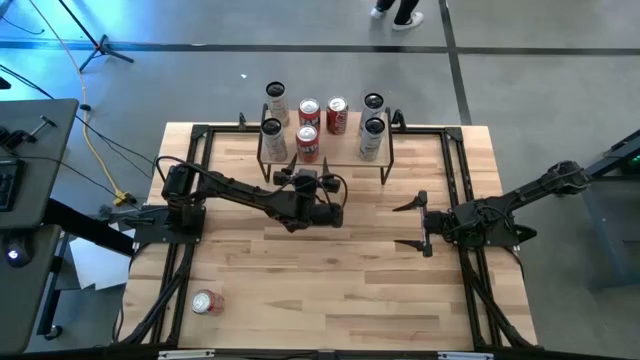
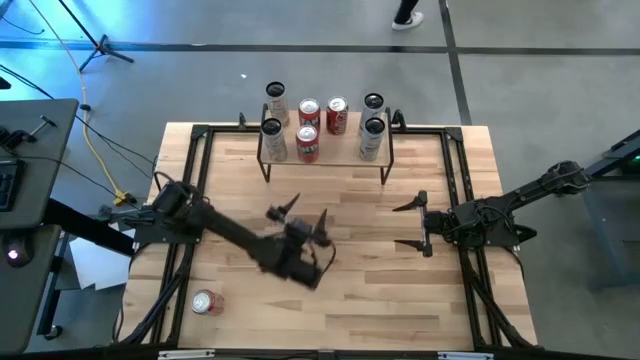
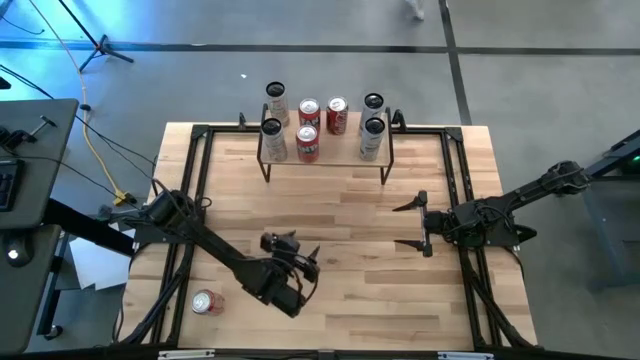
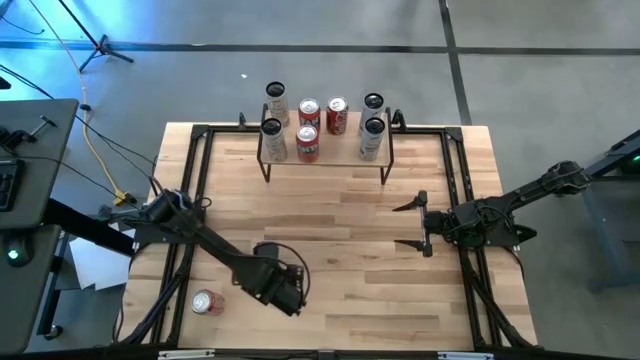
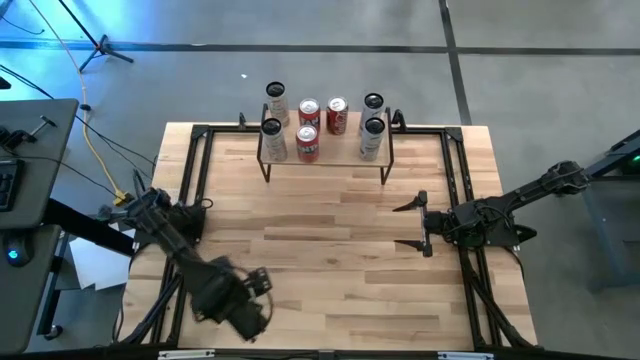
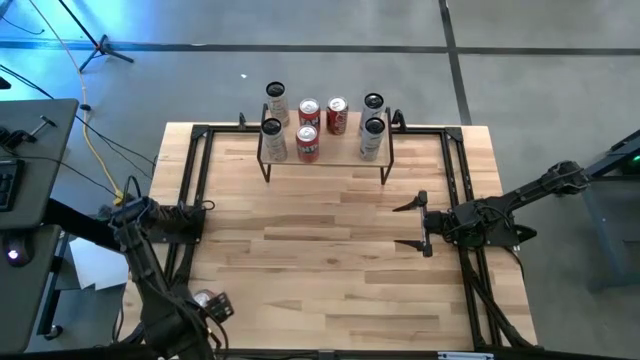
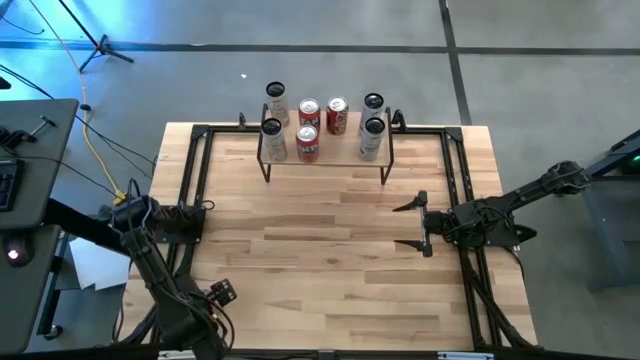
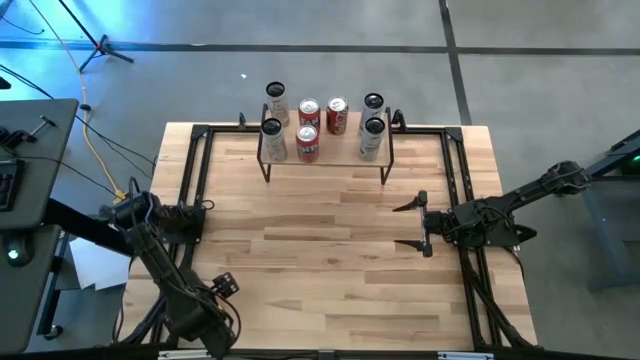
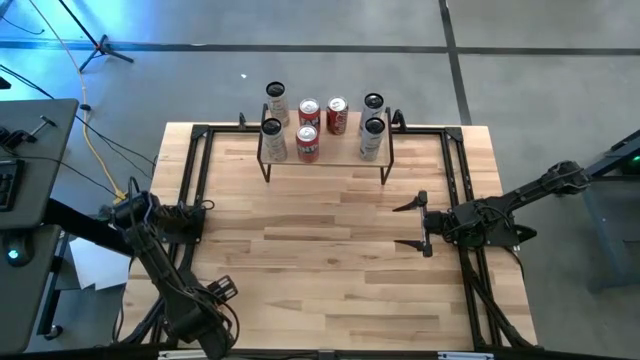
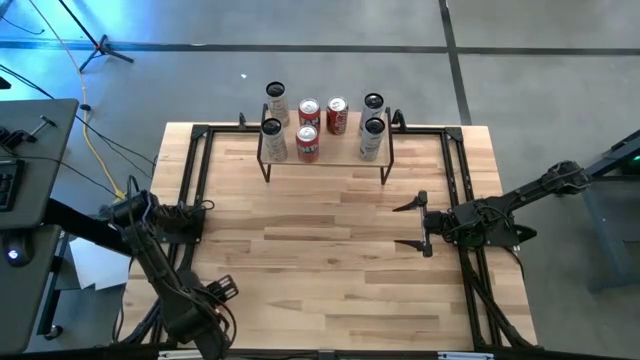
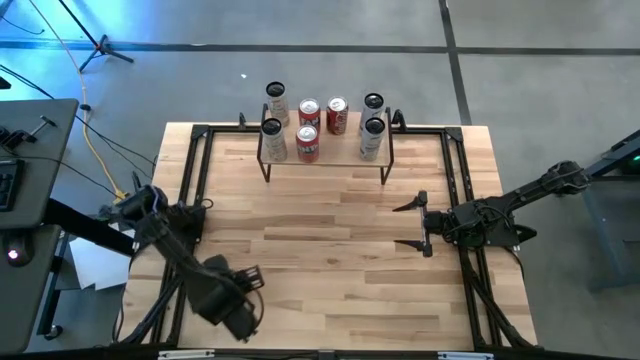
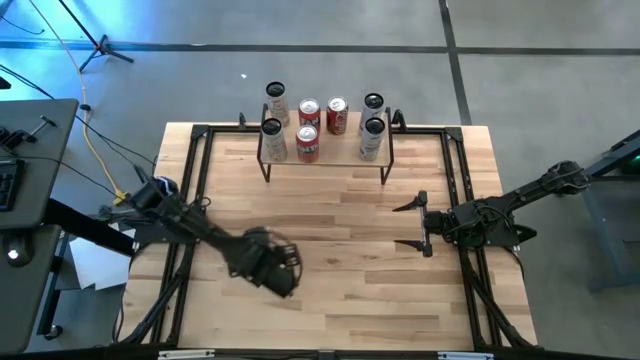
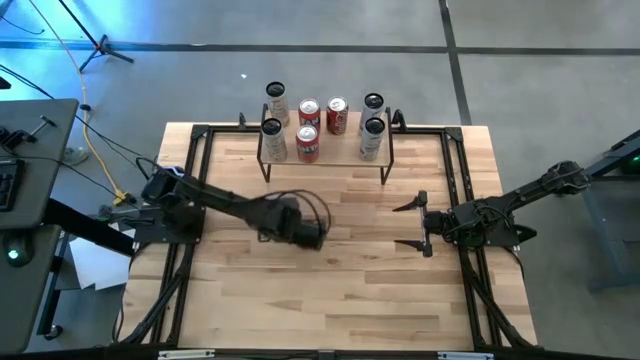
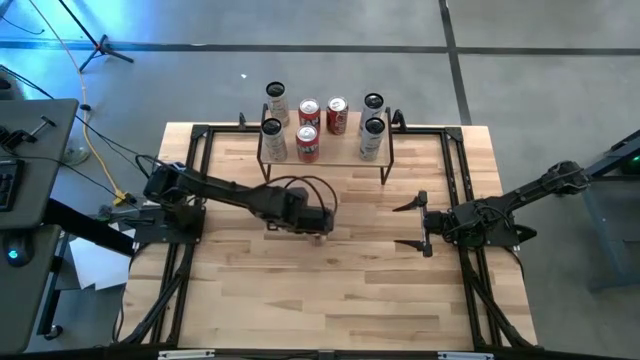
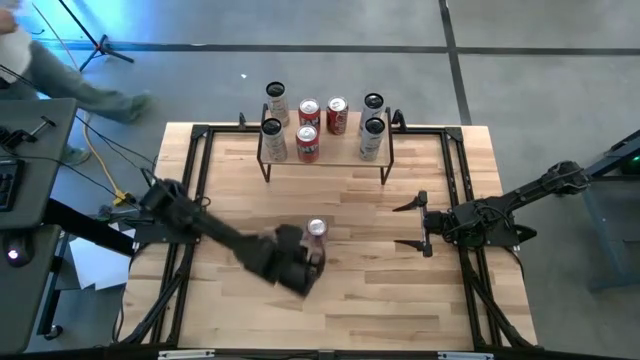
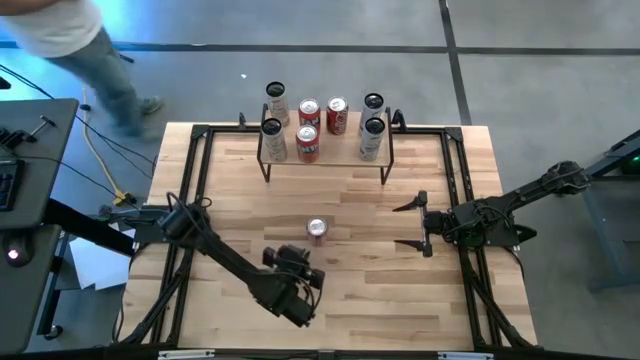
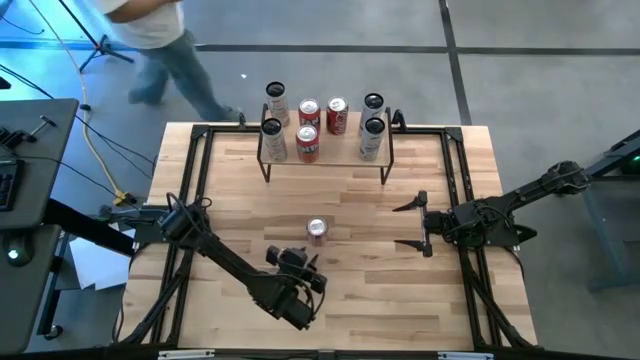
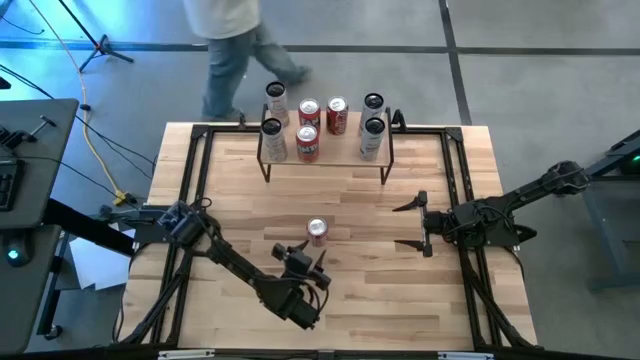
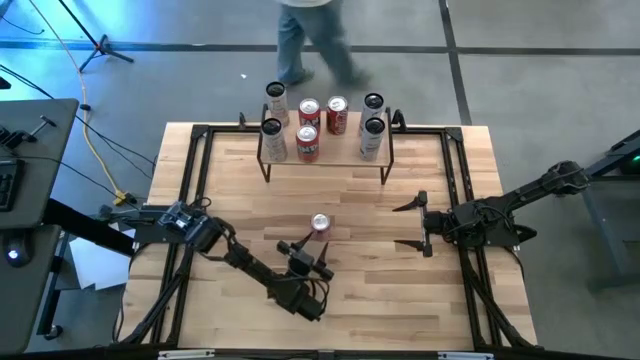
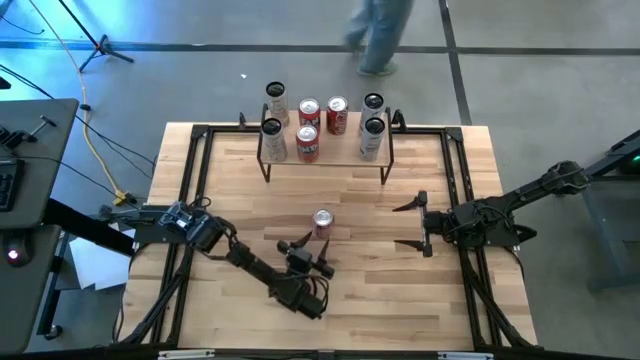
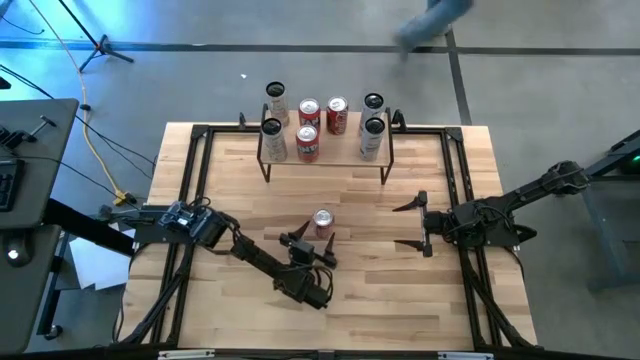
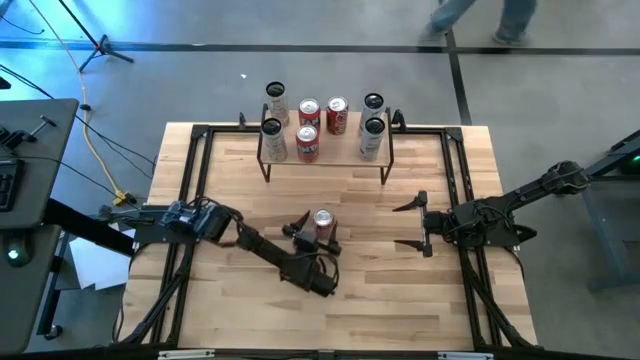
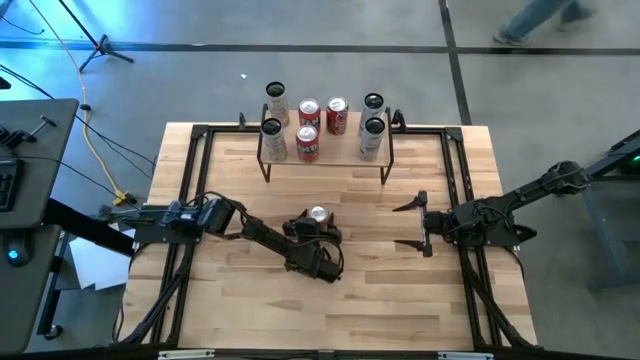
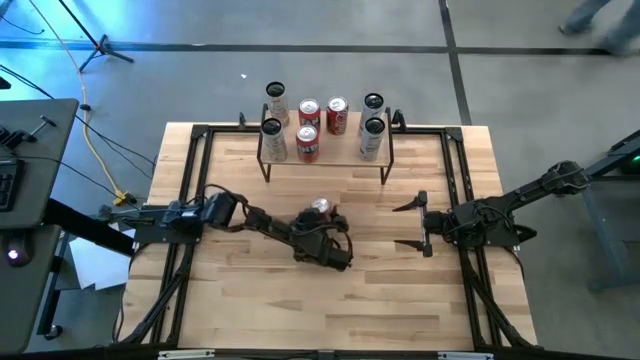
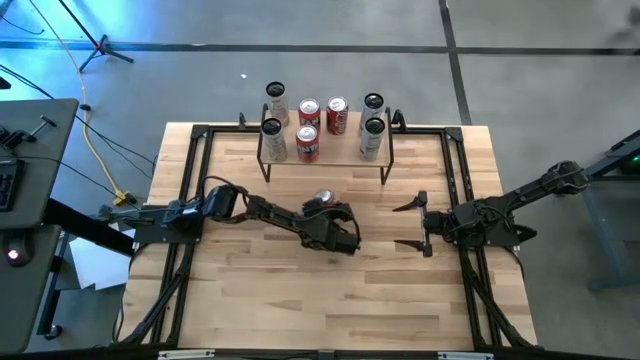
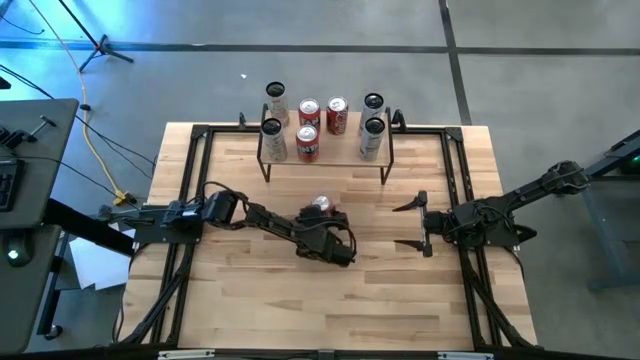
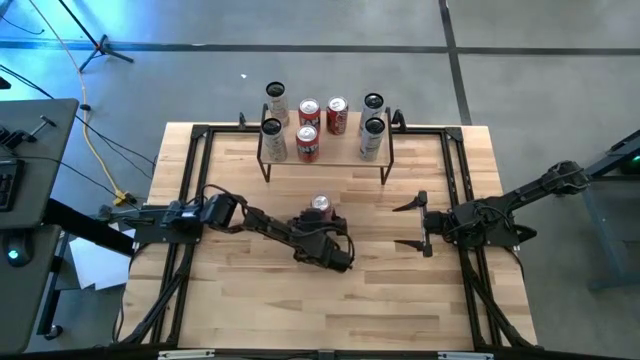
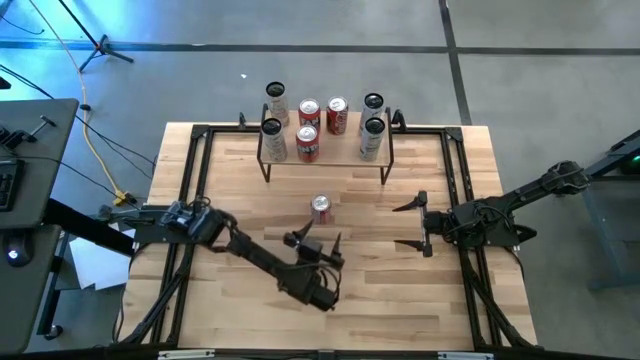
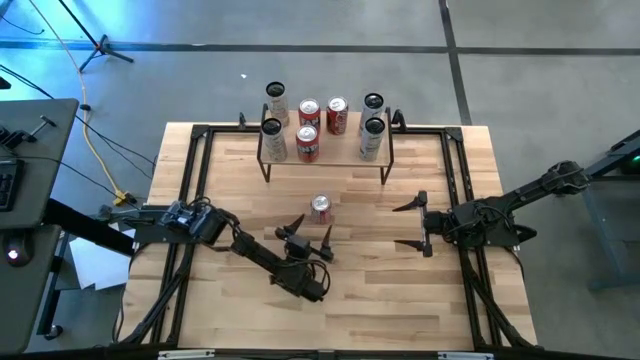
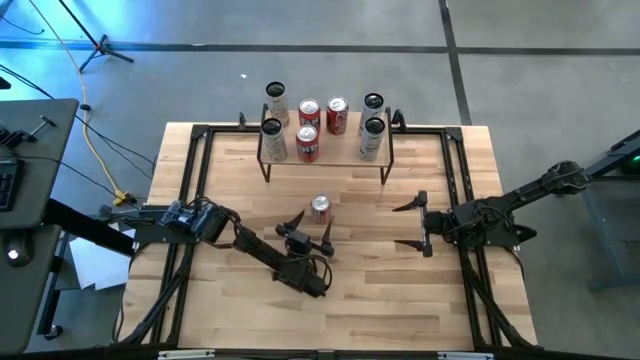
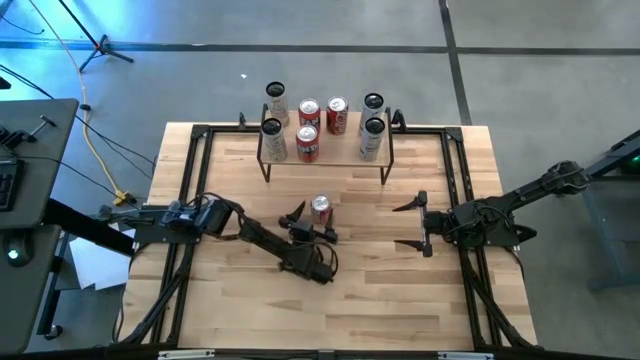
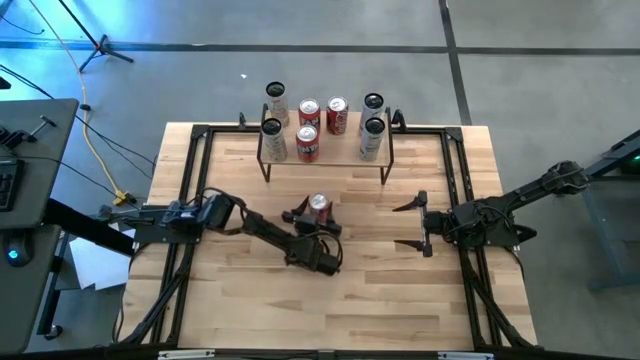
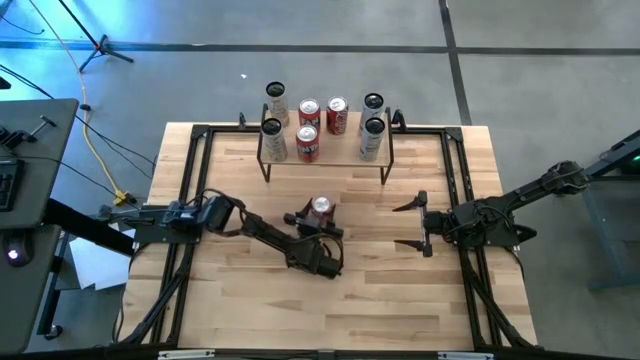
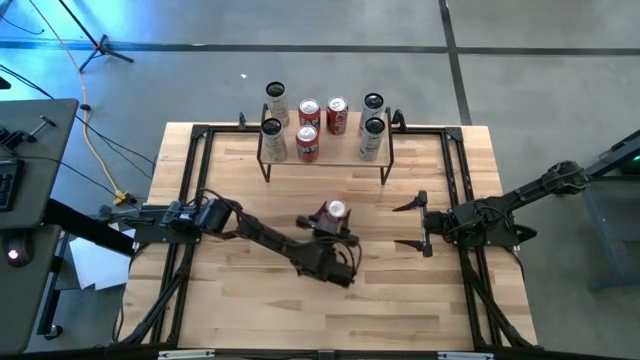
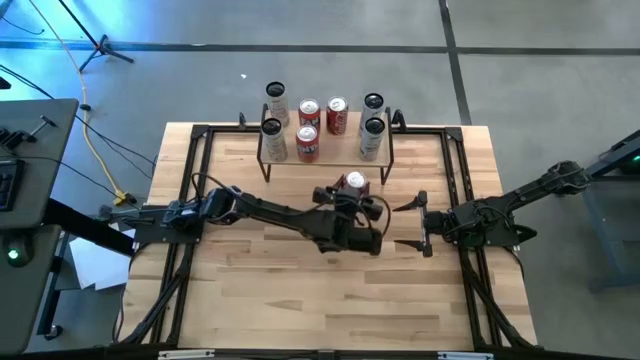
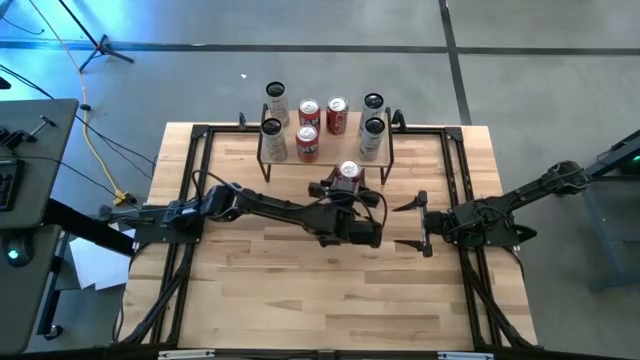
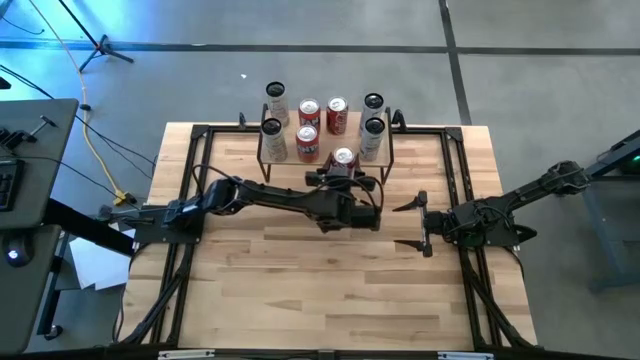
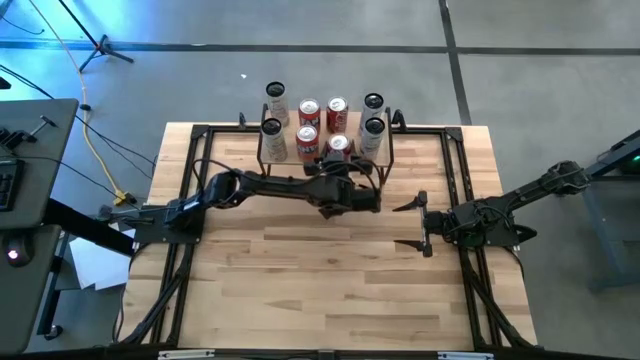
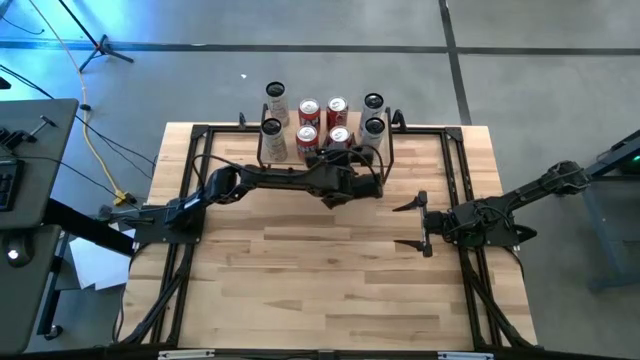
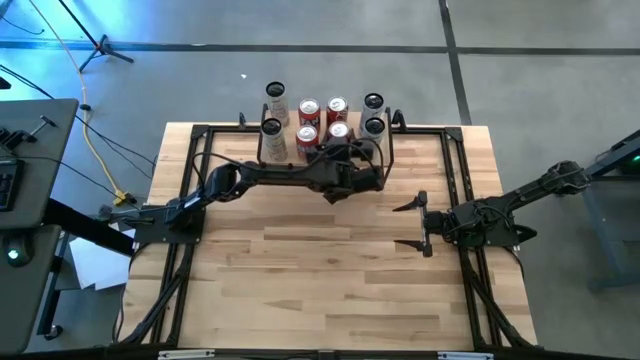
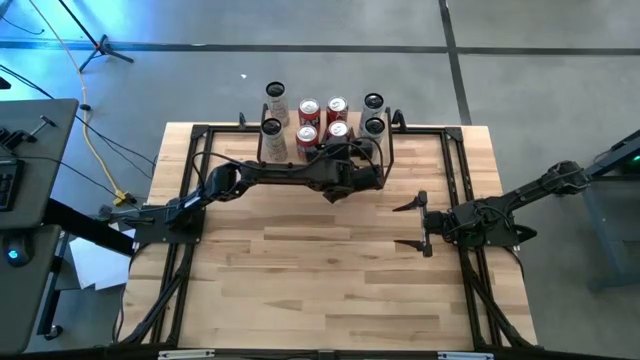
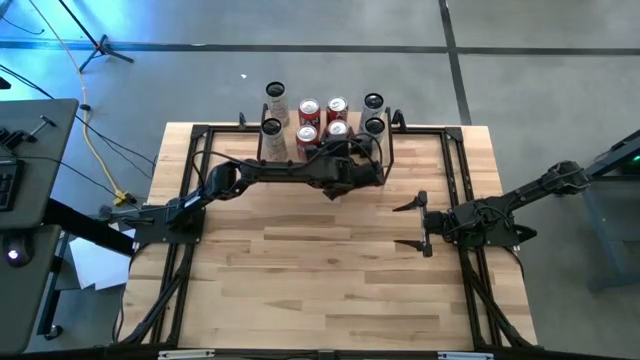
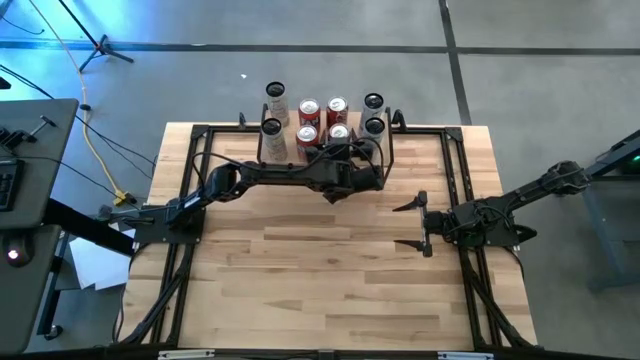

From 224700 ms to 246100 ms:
Task: Place canned beverage on shelf
Put the red and white soda can on the shelf aligned with the other red and white soda can
